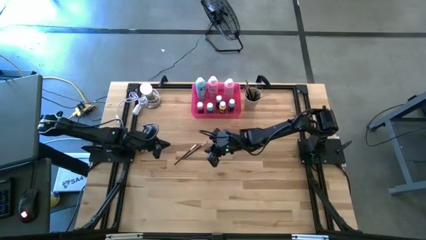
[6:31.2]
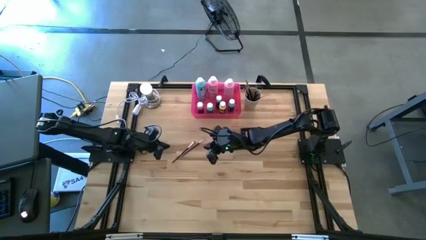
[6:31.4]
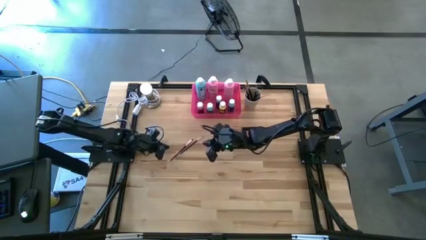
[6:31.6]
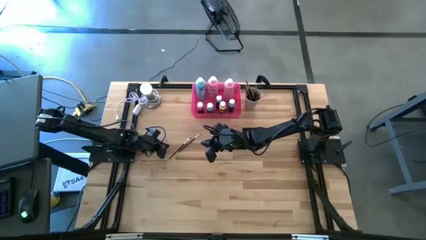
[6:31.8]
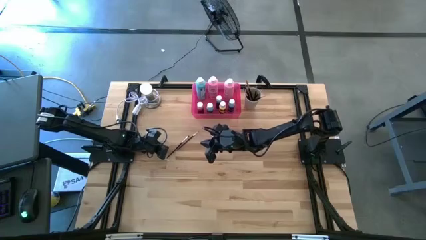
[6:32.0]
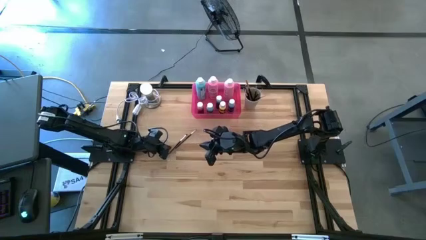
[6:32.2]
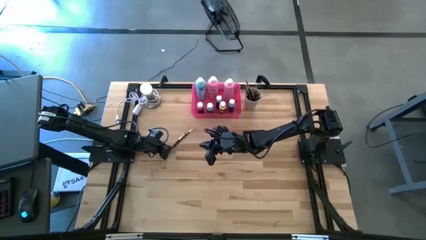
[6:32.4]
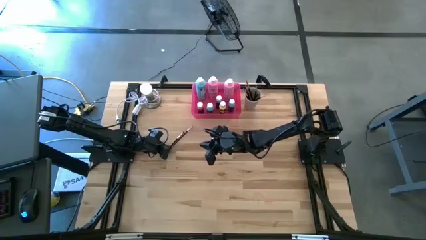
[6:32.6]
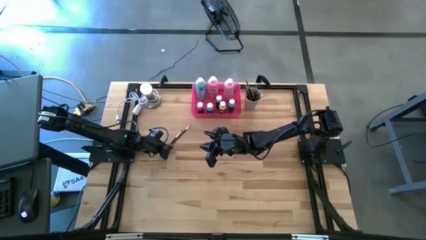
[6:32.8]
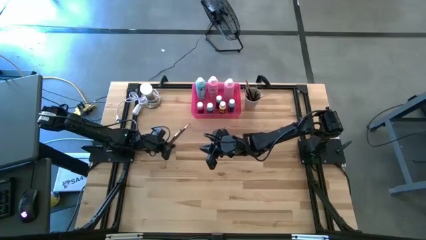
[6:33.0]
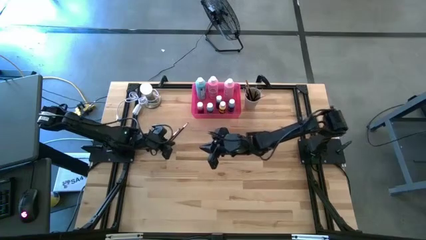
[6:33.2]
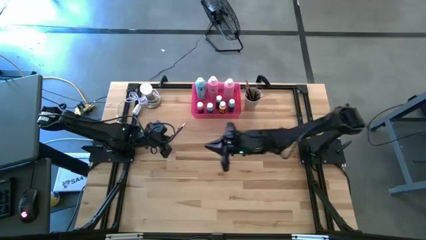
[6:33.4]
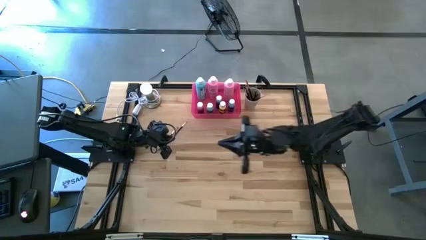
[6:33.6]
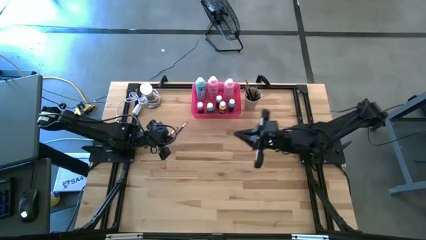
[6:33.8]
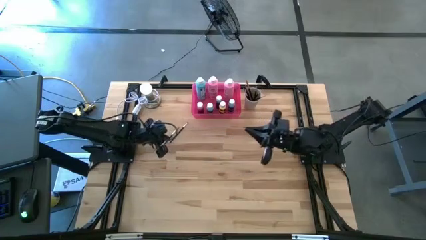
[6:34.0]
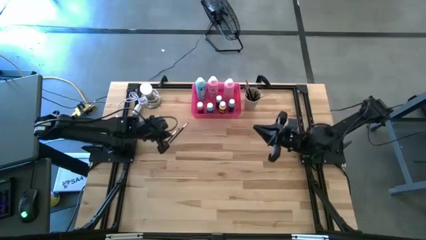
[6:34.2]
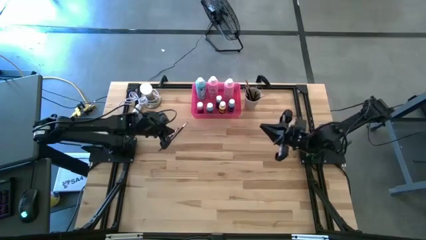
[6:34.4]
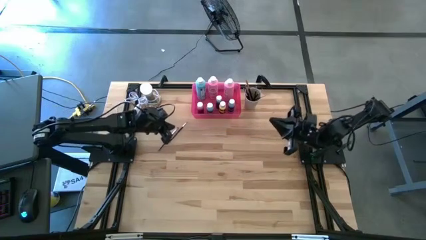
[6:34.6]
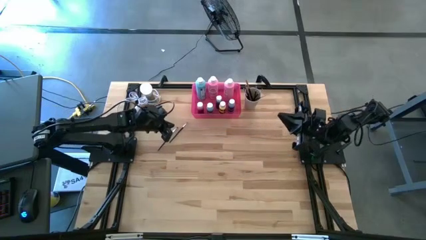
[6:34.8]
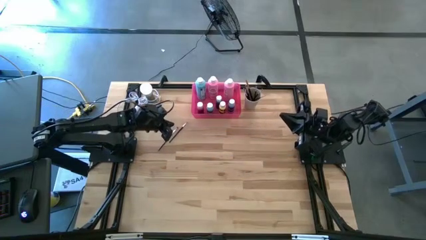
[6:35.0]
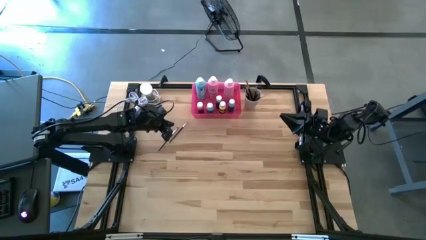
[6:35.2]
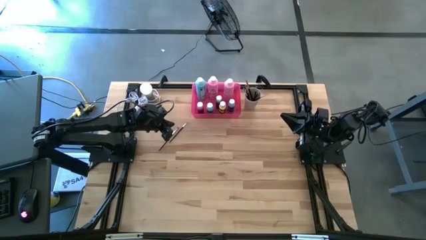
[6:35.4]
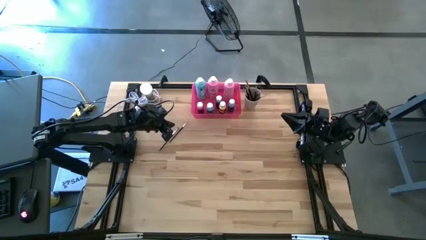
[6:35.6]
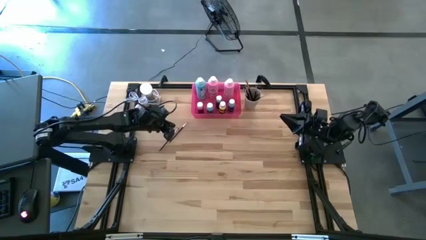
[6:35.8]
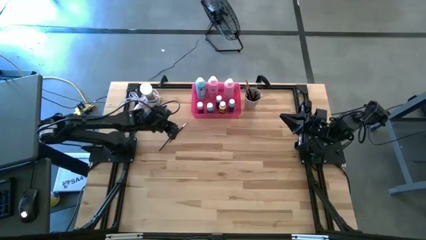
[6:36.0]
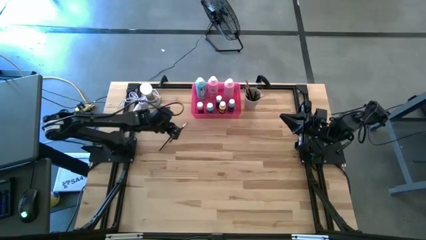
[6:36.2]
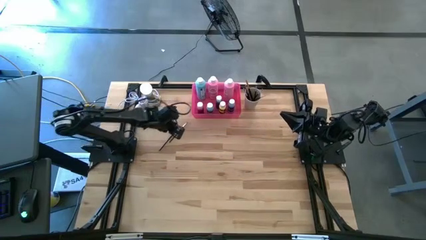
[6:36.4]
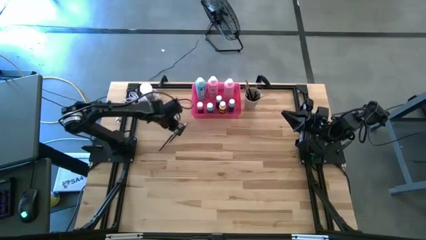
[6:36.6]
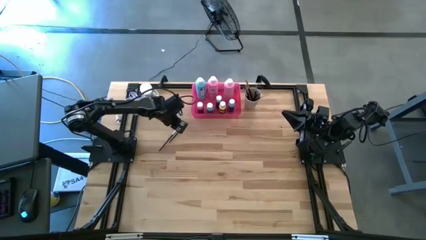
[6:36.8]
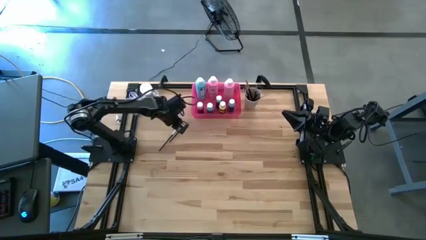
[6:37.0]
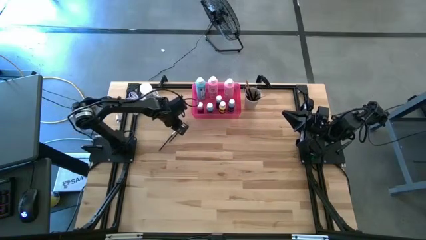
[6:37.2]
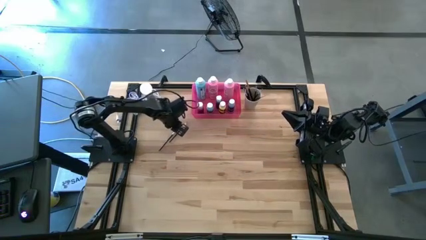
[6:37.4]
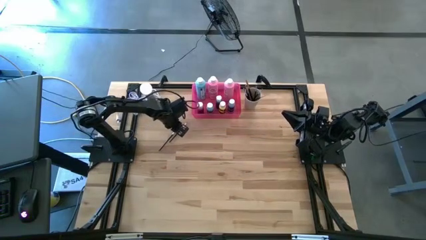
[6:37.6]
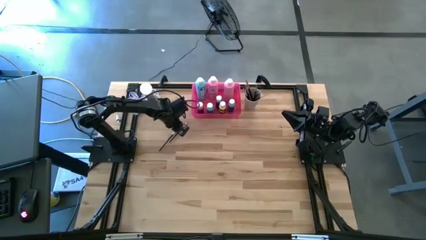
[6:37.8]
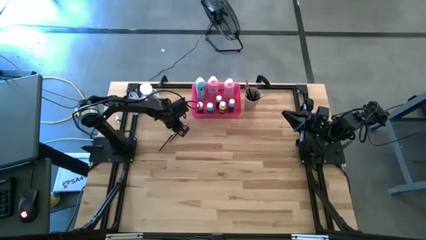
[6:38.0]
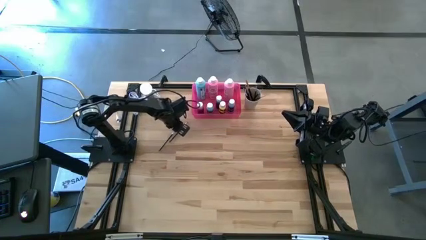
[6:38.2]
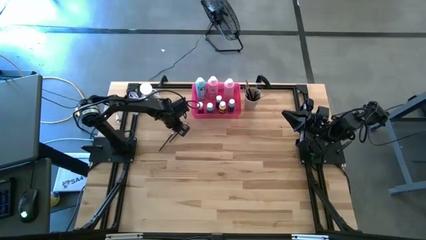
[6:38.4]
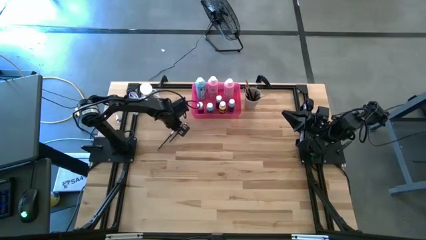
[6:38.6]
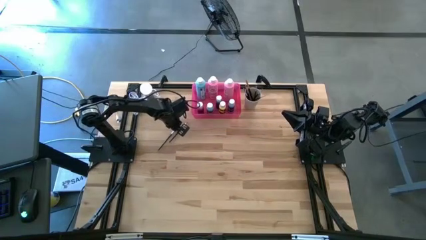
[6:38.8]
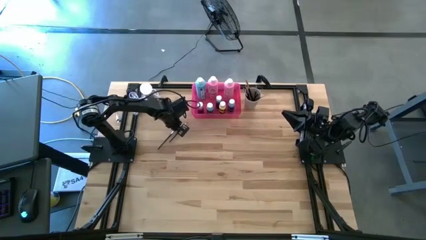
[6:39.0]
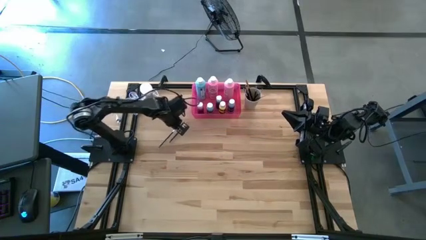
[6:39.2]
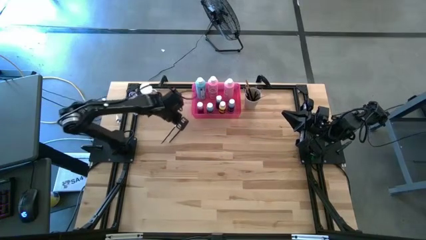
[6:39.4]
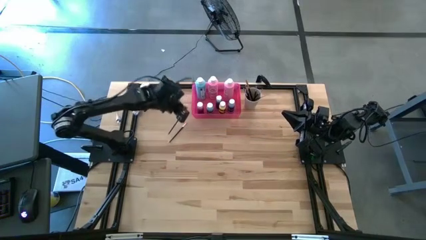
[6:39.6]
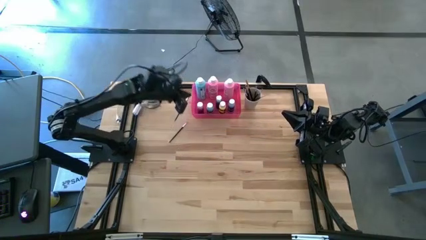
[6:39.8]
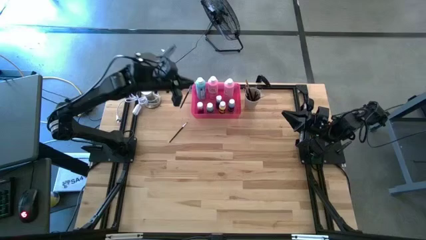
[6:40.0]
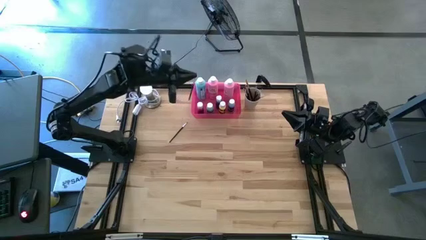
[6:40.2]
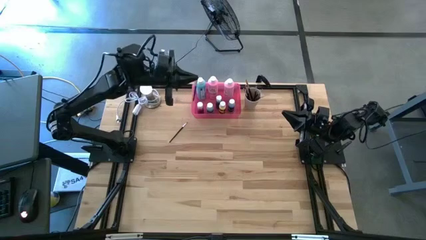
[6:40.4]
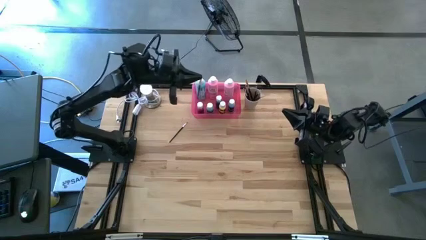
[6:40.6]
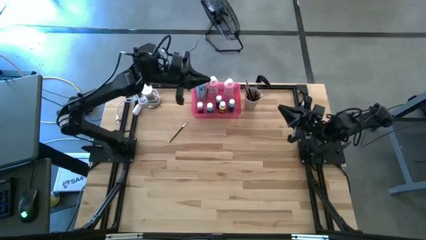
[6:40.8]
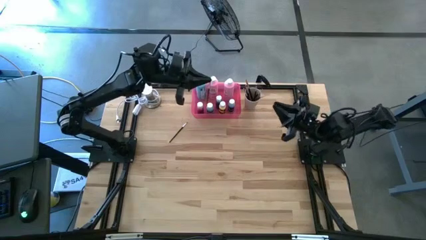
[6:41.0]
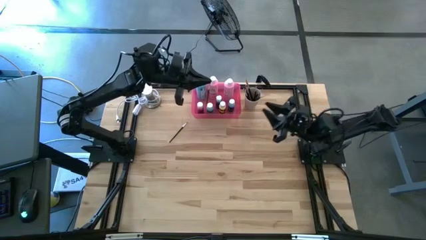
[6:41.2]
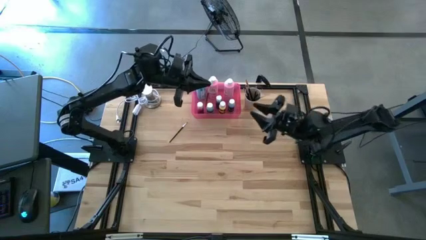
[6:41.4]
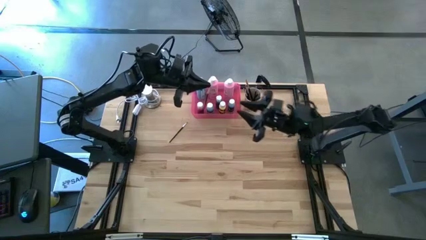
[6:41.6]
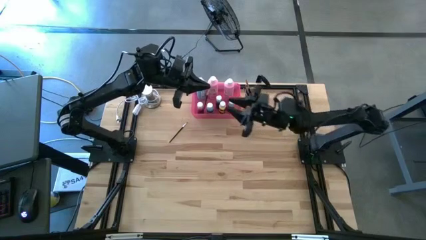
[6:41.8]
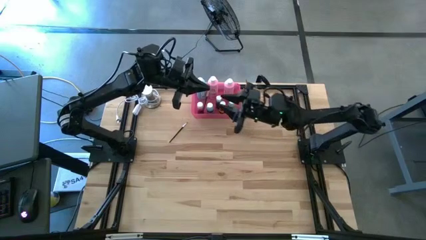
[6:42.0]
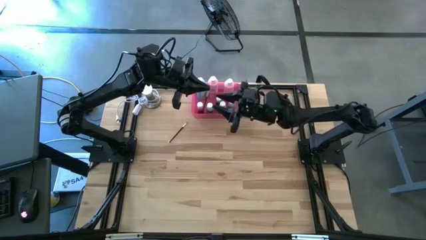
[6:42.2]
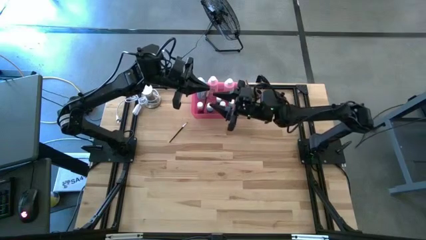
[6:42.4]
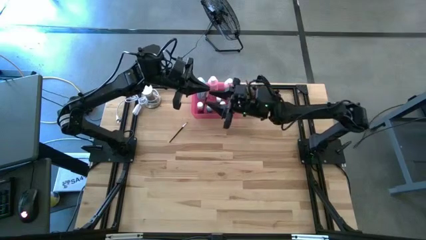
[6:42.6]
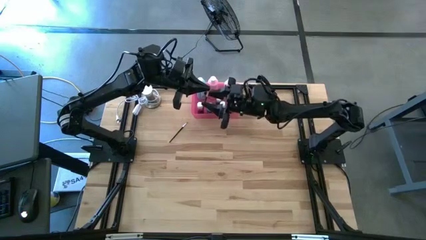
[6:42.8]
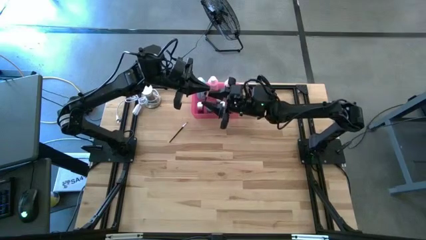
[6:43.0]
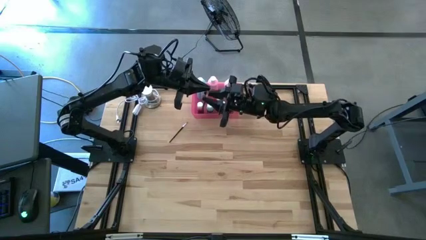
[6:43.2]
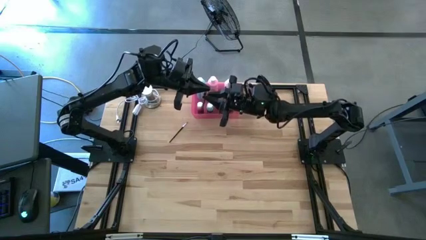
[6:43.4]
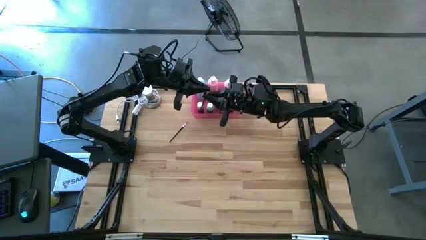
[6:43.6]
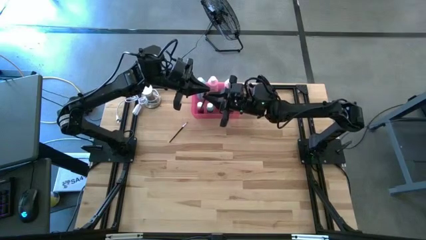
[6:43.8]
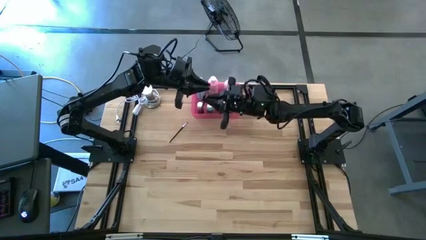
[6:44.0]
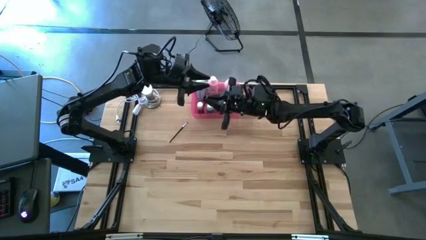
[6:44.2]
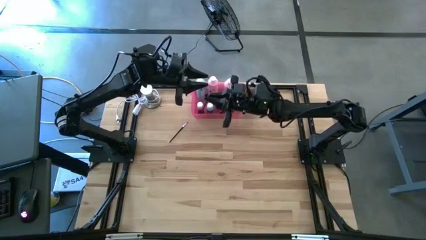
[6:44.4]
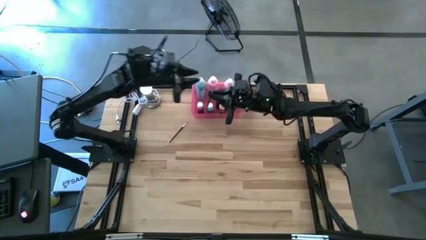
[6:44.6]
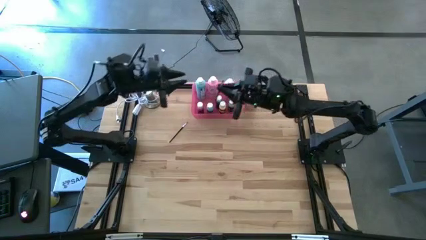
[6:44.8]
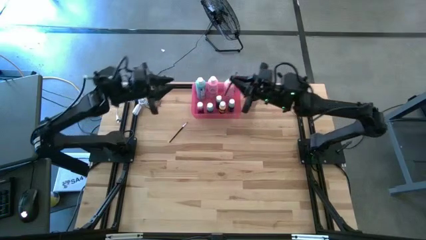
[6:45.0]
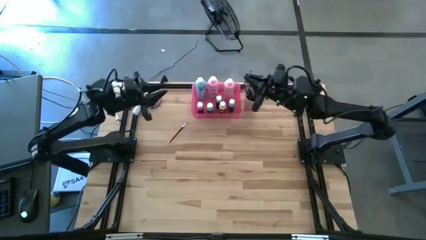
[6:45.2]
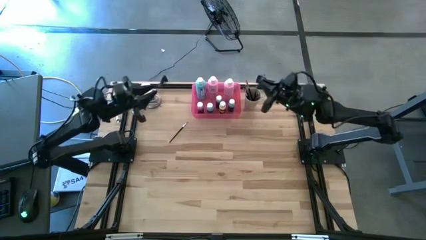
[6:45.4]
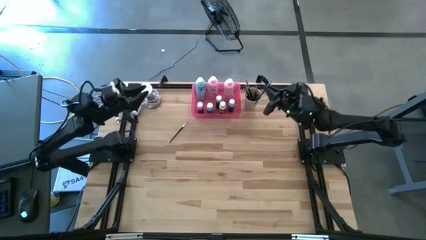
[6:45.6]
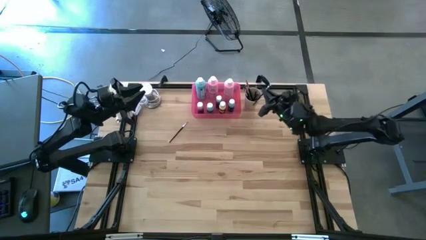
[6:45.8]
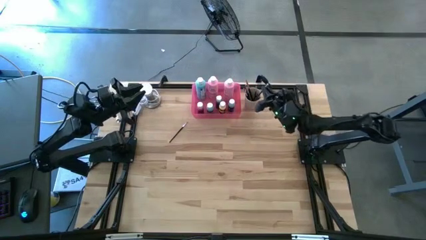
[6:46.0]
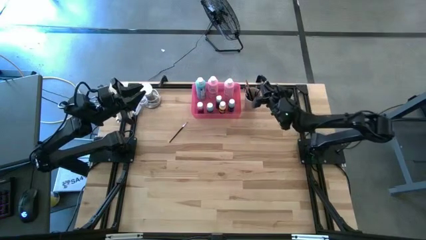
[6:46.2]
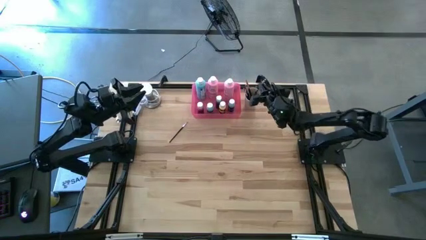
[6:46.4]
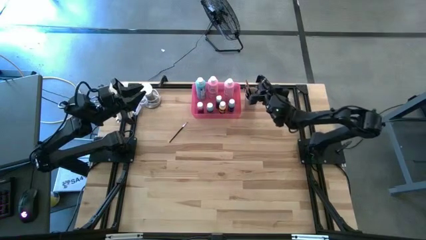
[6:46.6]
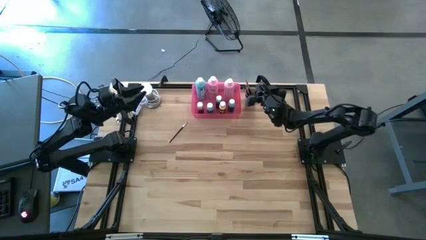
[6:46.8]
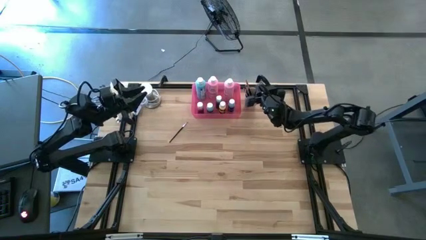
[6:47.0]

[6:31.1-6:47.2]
Task: Pick & Place Paint Supplies
Put the silver paintbrush into the white cup
